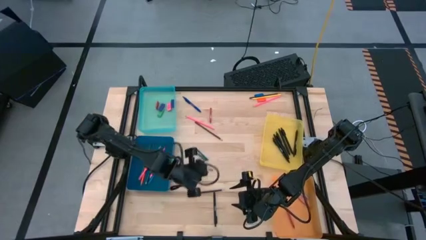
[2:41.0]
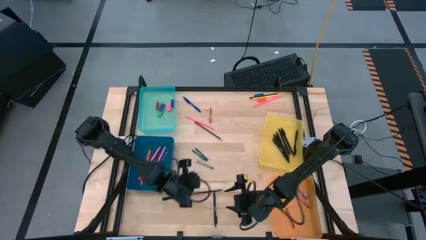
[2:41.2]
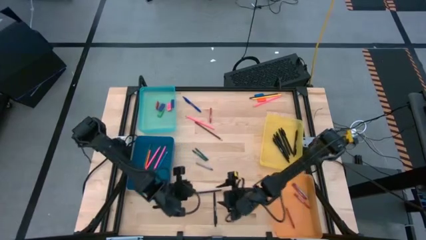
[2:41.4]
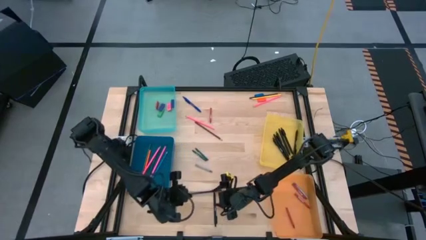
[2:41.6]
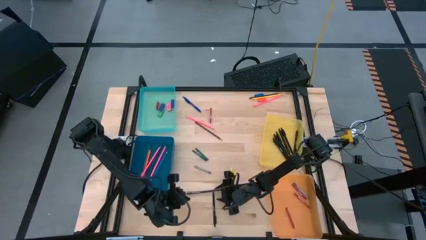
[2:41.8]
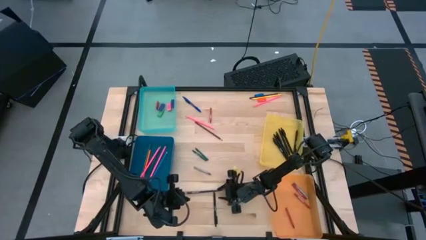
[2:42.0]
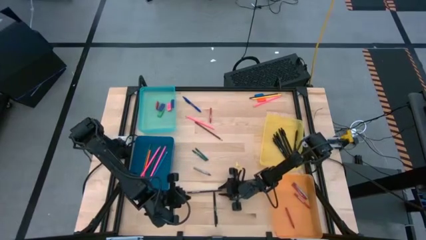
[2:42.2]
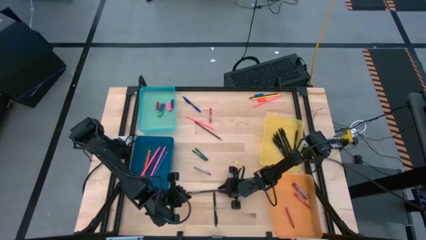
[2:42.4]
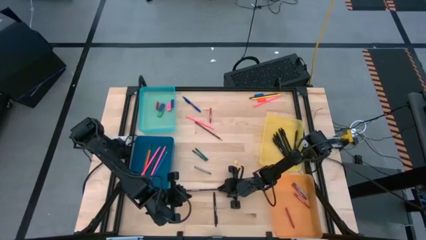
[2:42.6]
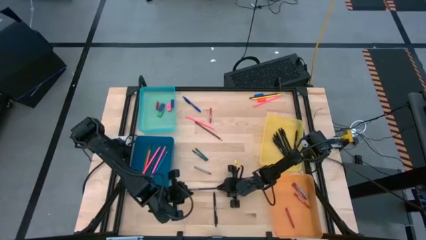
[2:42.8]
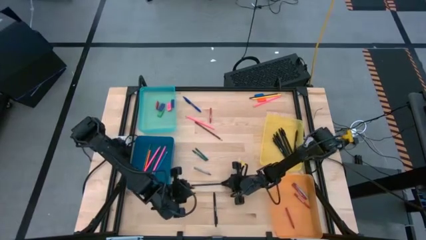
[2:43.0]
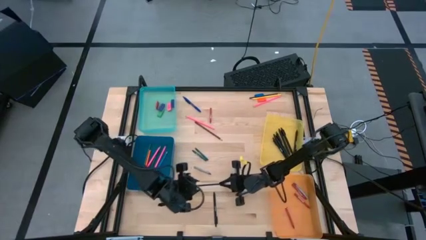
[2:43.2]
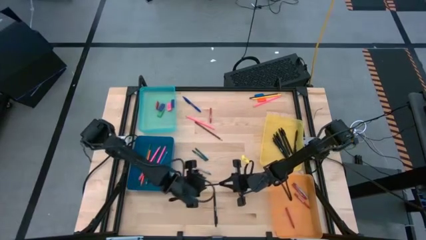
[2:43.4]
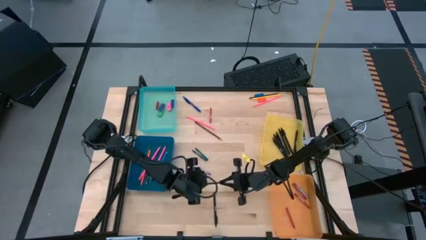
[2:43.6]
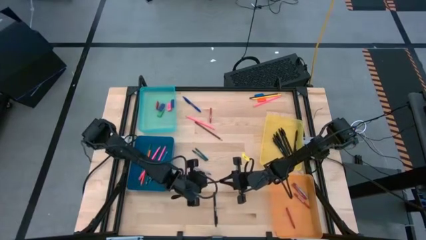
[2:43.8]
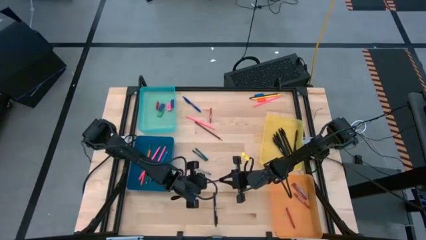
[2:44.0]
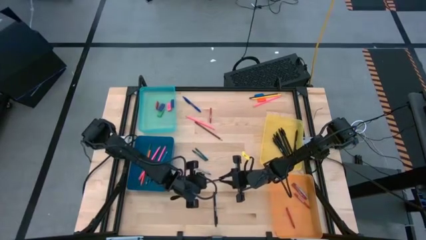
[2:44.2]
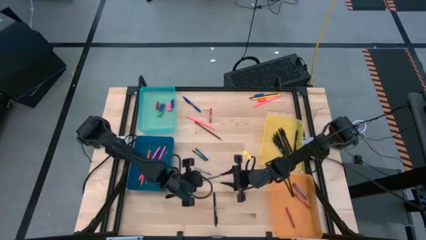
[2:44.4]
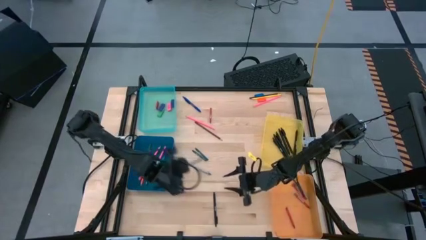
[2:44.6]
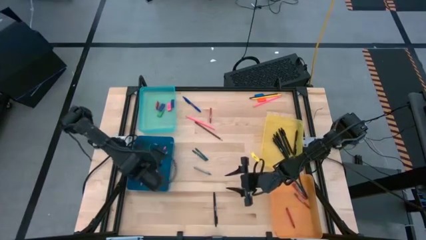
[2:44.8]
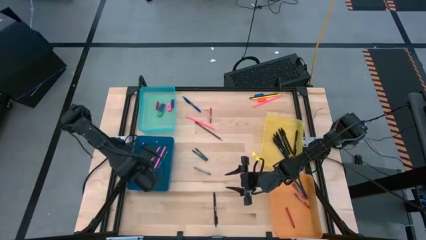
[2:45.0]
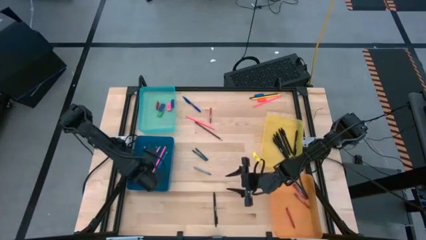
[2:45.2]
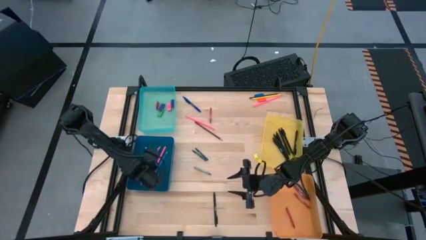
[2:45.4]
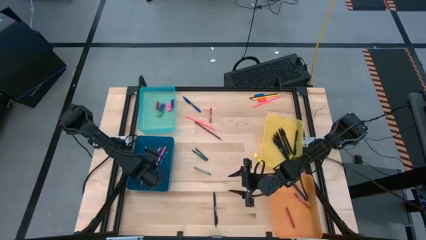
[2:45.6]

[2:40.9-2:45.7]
Task: Sort crayons/erasers/pens/pencils in bins
Put the blue colored pencil into the blue bin

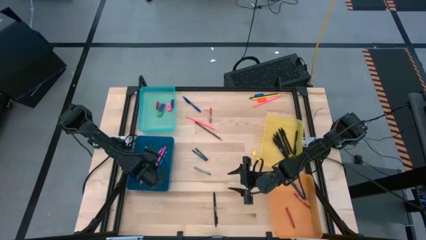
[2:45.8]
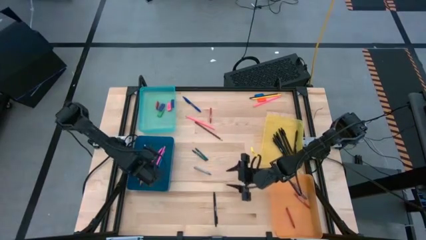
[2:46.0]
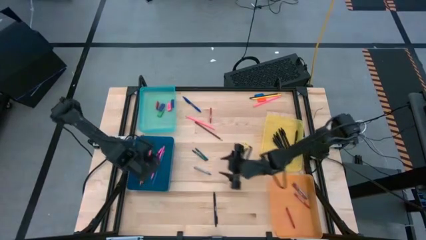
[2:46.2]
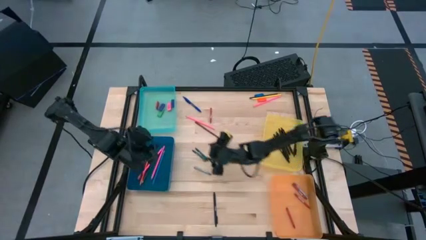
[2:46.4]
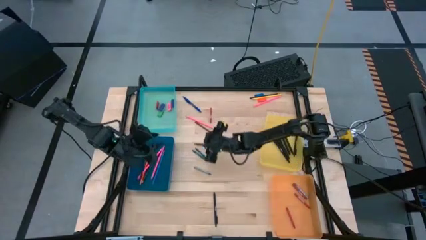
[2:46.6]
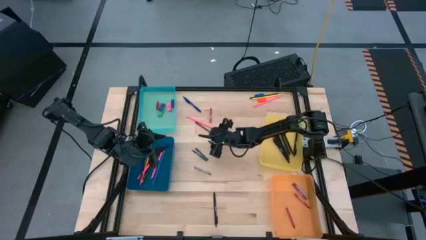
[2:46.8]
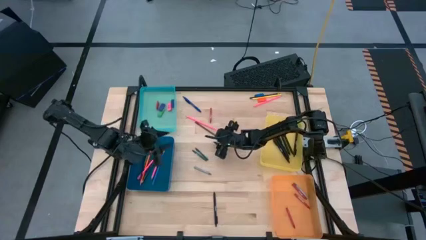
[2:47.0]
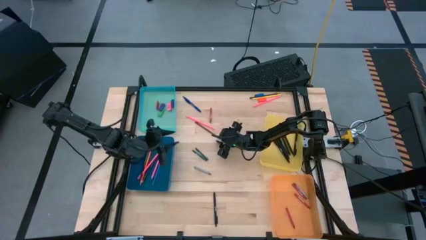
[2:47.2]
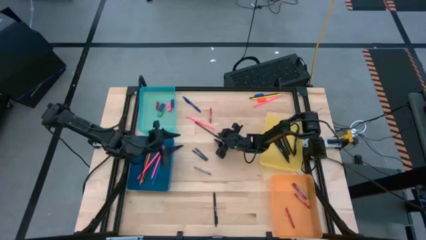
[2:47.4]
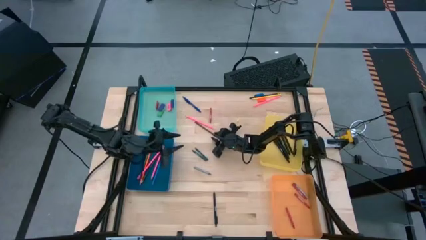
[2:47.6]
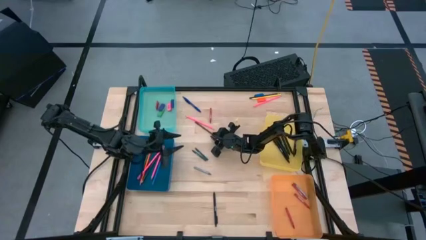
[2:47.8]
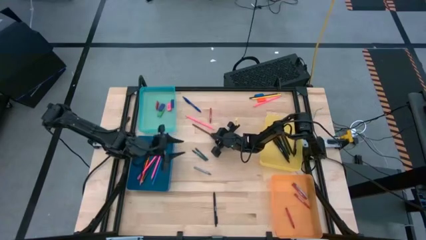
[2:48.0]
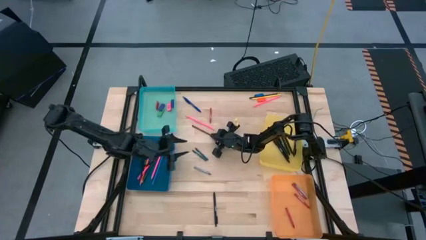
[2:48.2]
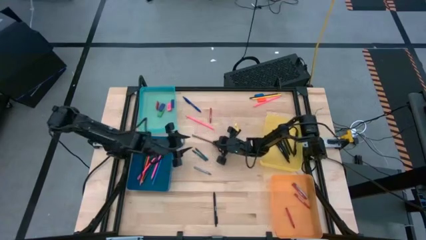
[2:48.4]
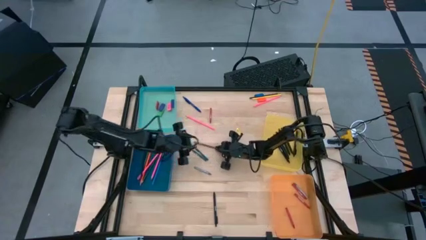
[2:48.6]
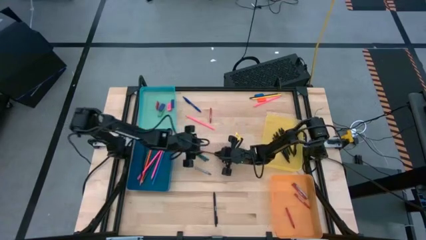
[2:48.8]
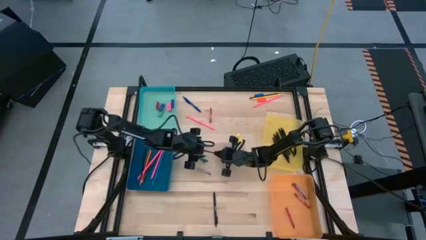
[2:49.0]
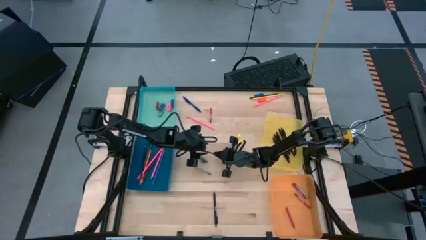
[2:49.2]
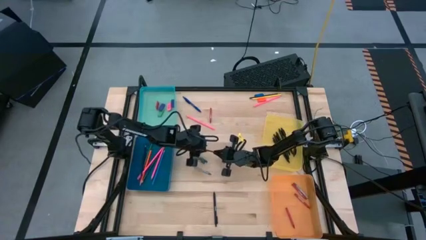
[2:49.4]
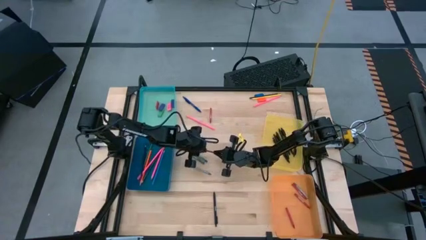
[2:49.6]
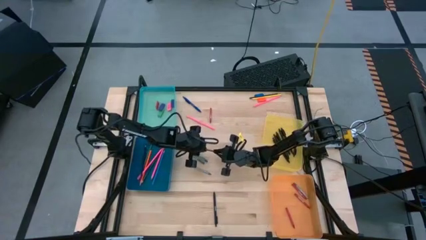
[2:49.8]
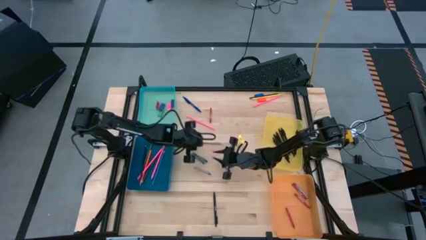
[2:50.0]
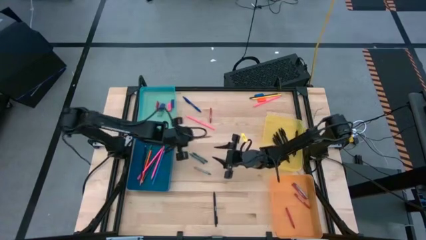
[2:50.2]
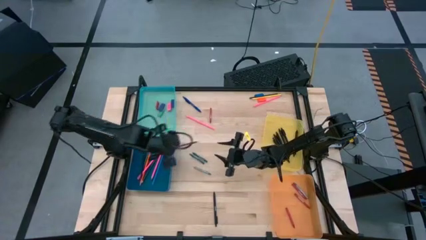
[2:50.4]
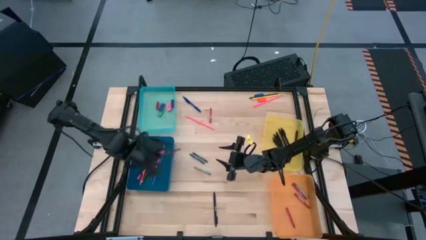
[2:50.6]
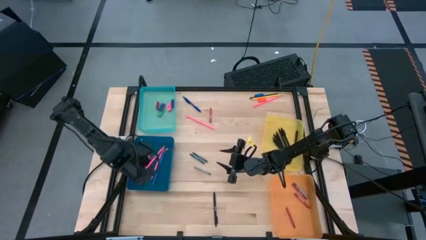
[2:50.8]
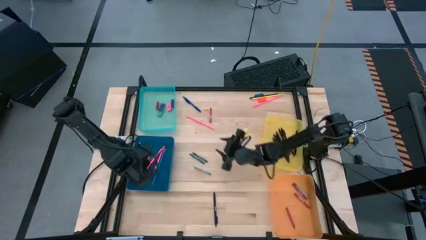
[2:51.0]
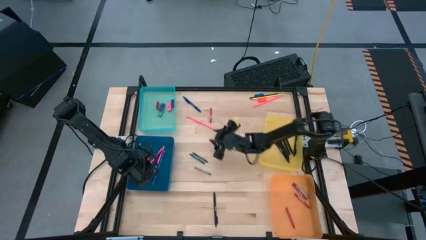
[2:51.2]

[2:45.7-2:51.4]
Put the brown colored pencil into the blue bin

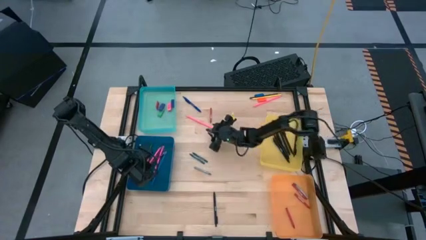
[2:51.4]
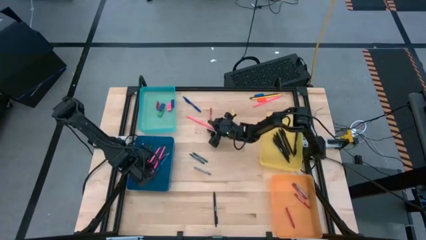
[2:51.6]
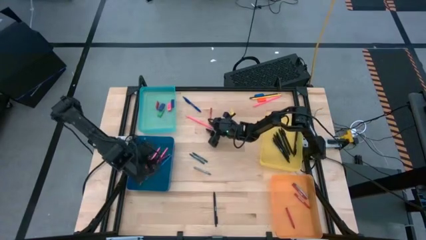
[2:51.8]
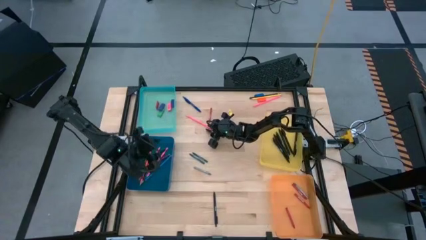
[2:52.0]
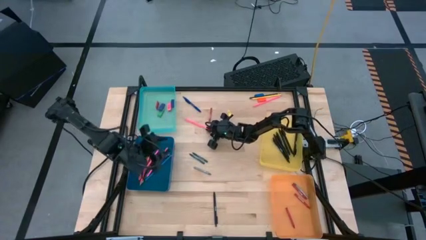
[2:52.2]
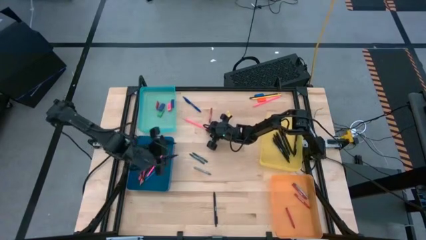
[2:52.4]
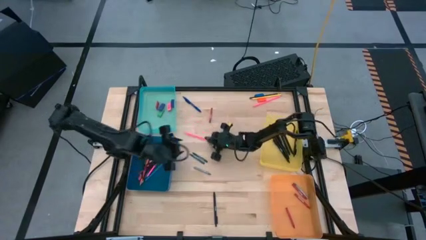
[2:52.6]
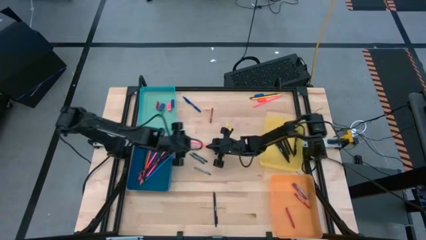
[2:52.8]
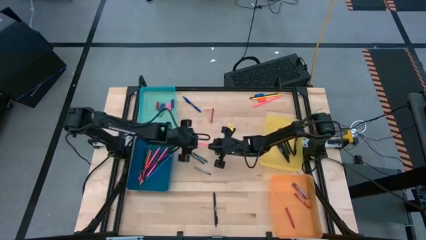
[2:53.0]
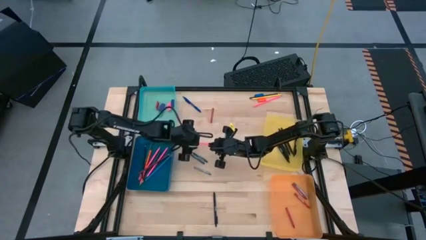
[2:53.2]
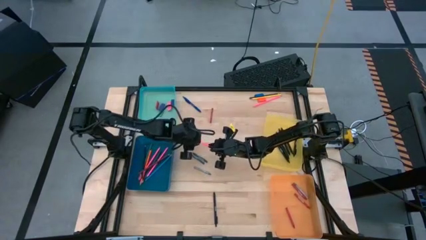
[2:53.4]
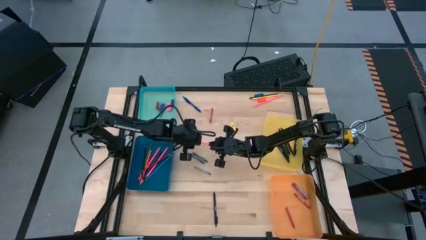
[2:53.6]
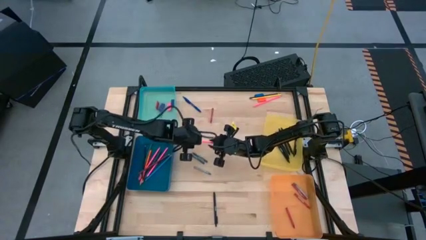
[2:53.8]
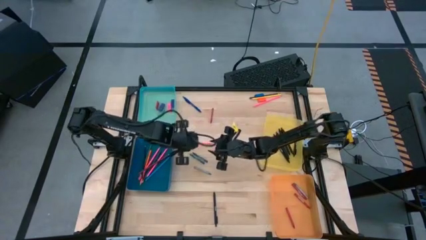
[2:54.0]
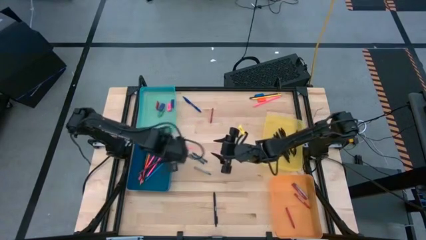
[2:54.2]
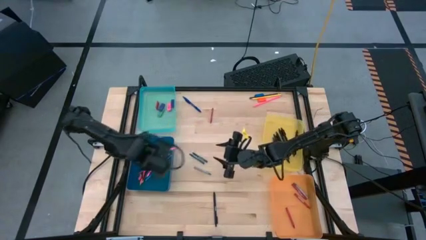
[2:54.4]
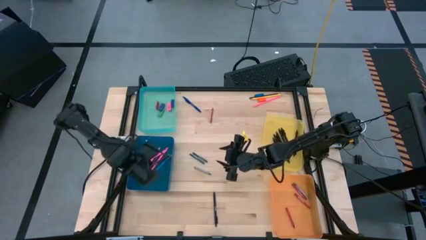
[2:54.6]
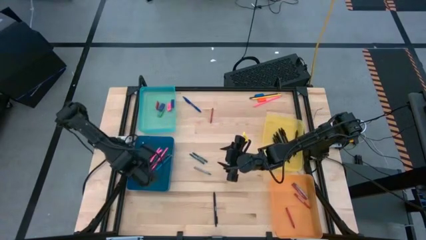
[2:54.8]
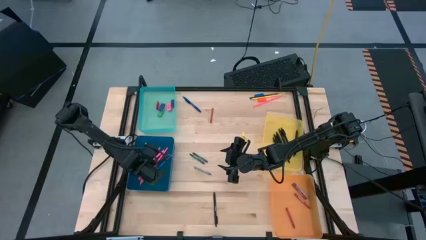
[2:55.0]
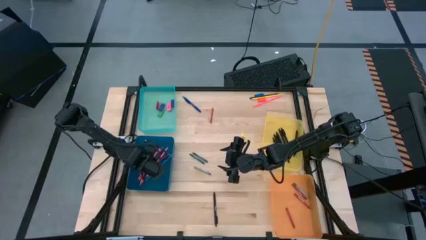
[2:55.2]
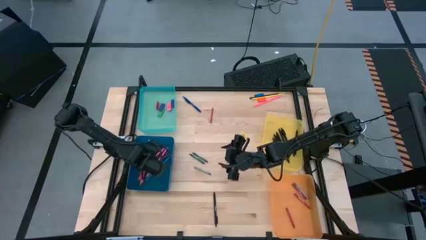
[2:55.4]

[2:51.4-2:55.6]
Put the pink colored pencil into the blue bin

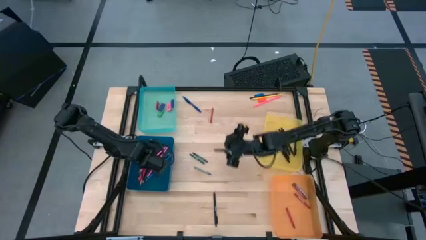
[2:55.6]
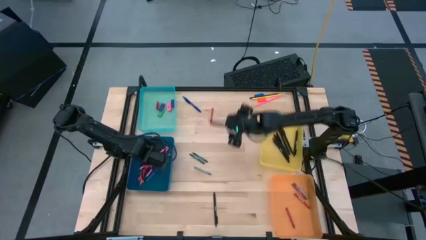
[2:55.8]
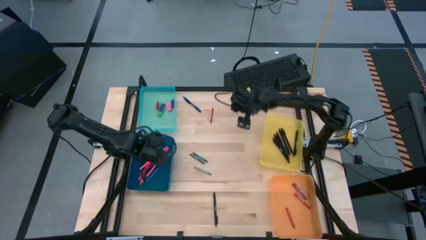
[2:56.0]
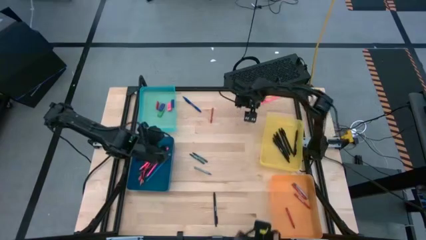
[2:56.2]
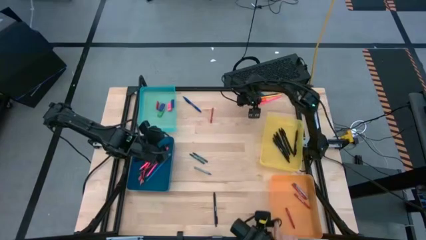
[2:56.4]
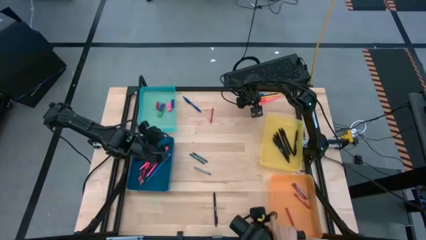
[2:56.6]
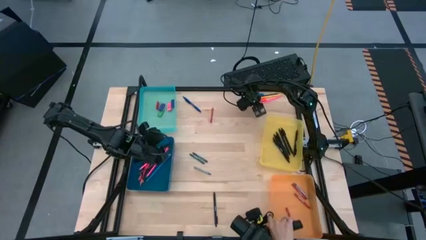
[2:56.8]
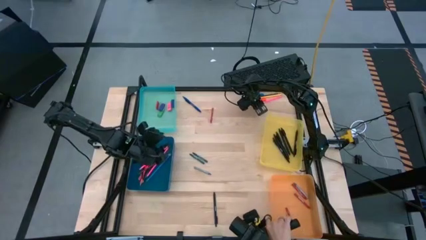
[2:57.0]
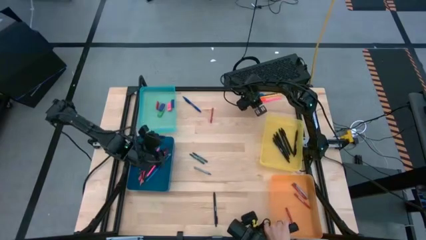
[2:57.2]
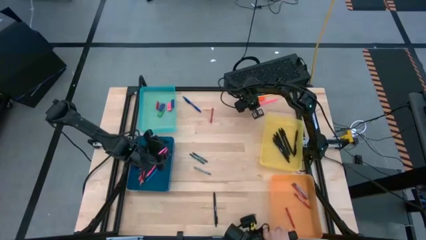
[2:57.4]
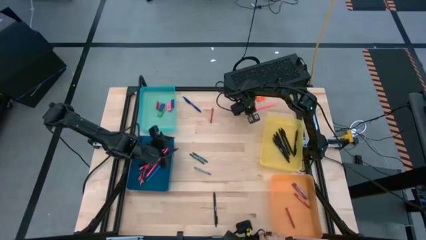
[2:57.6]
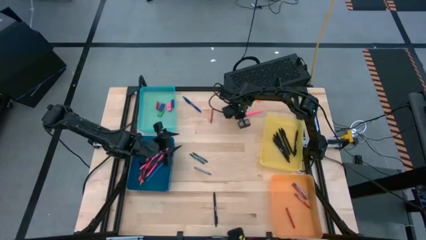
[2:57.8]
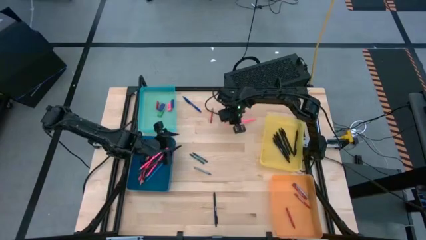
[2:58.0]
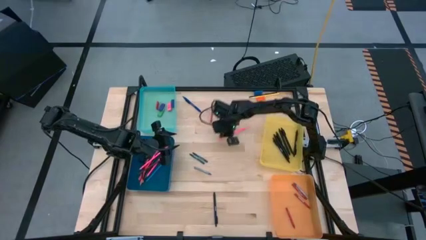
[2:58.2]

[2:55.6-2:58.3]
Put the pink colored pencil into the blue bin
